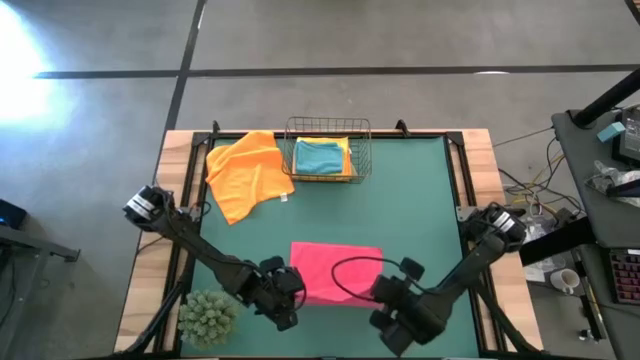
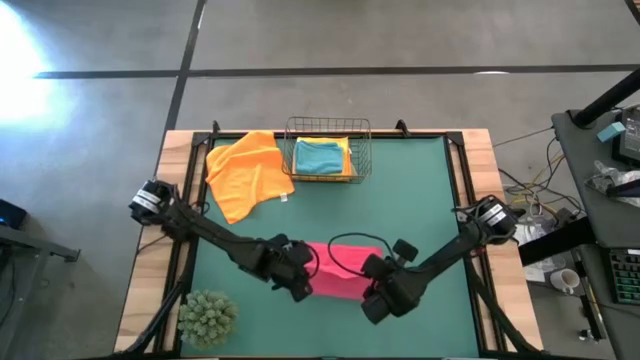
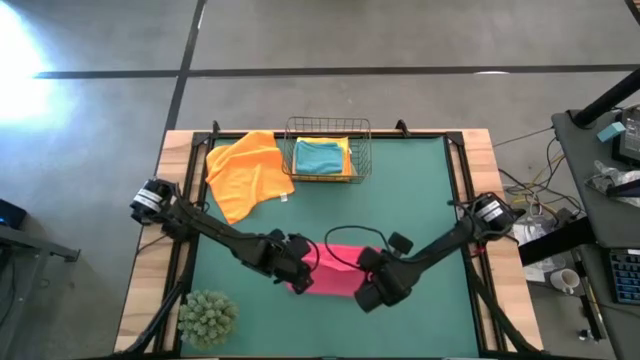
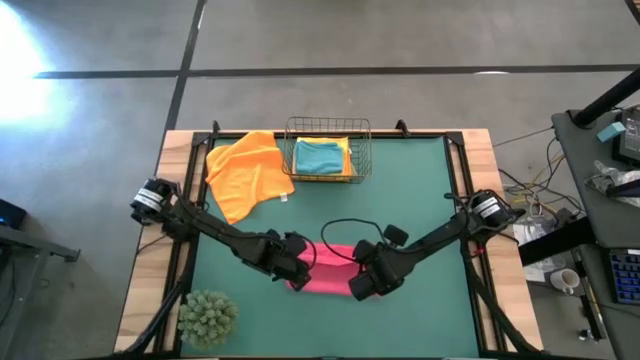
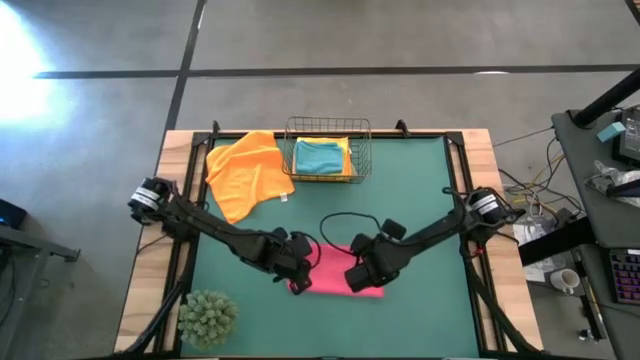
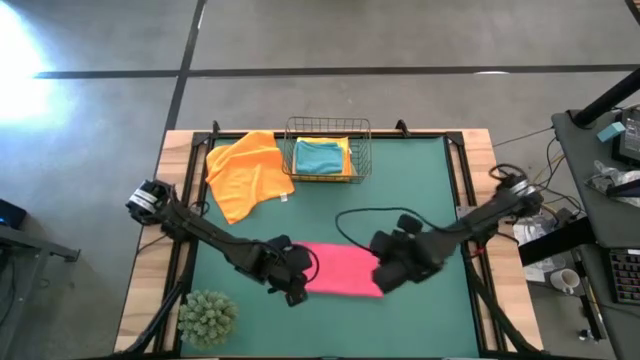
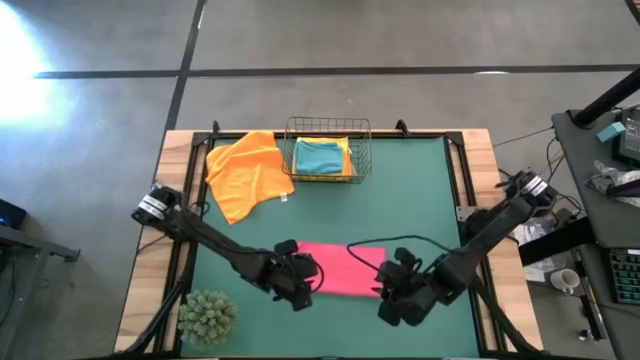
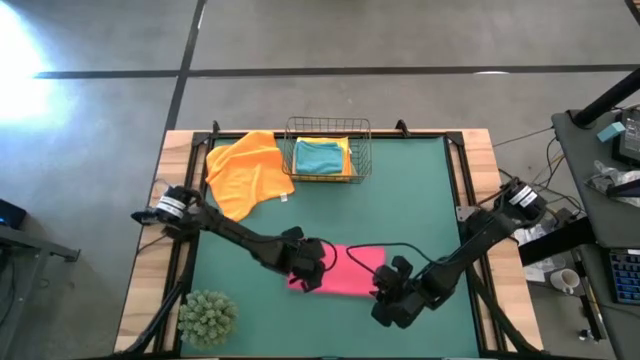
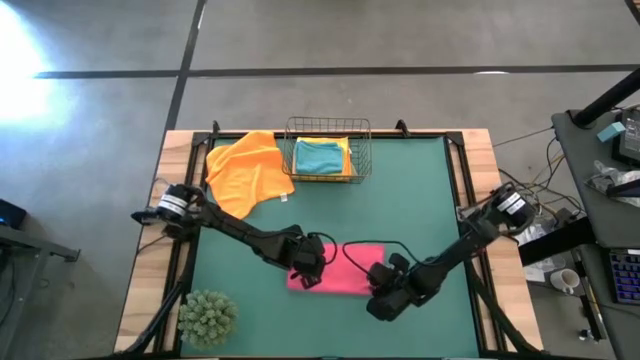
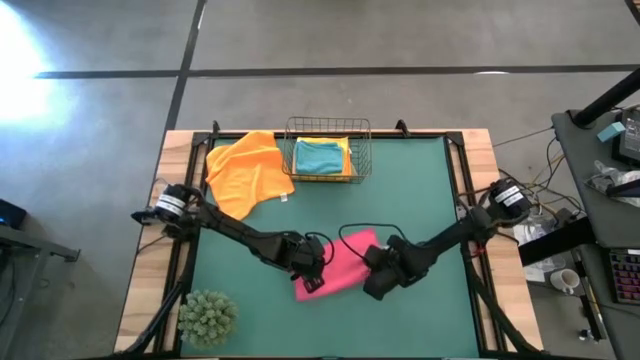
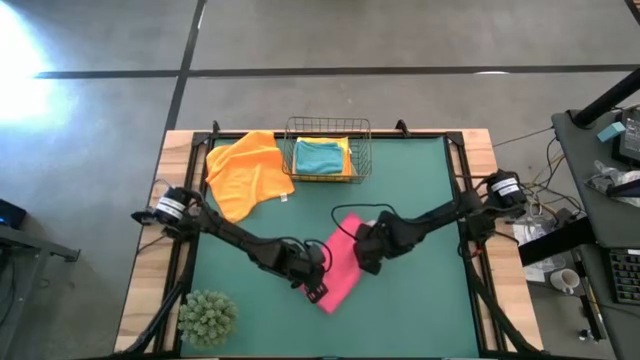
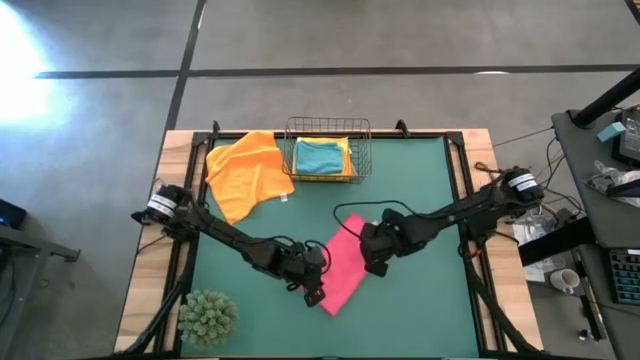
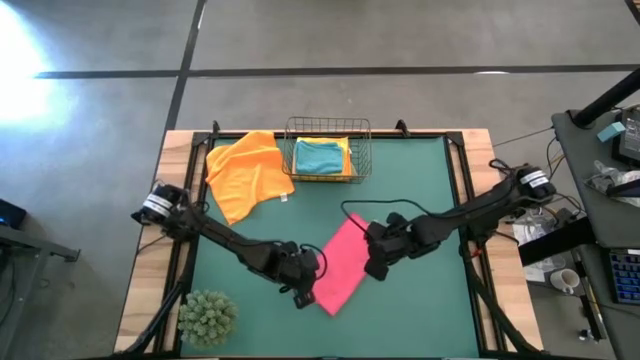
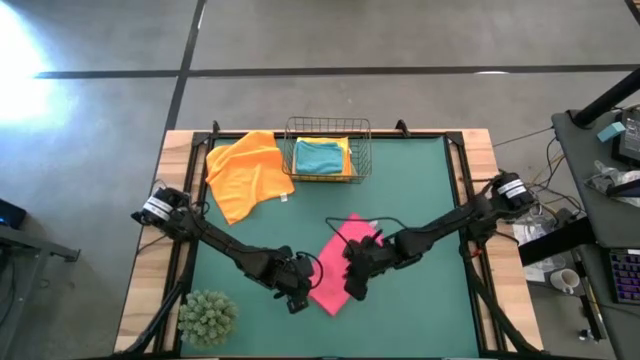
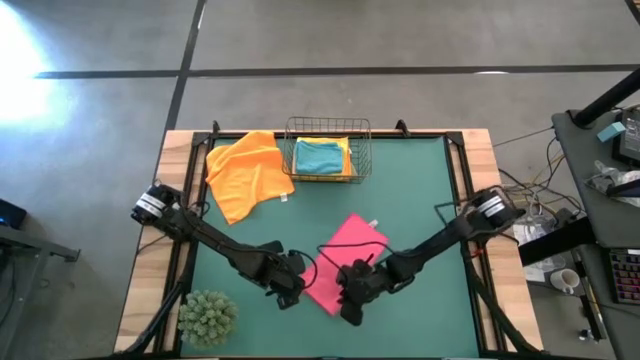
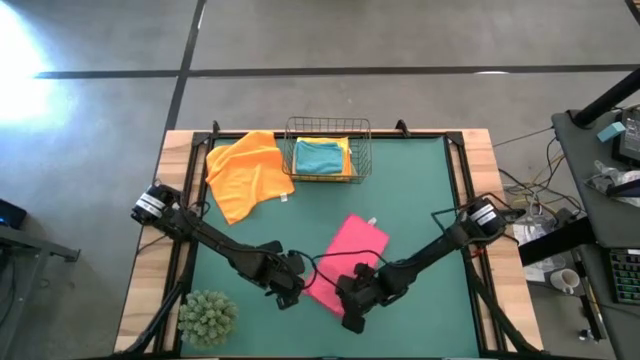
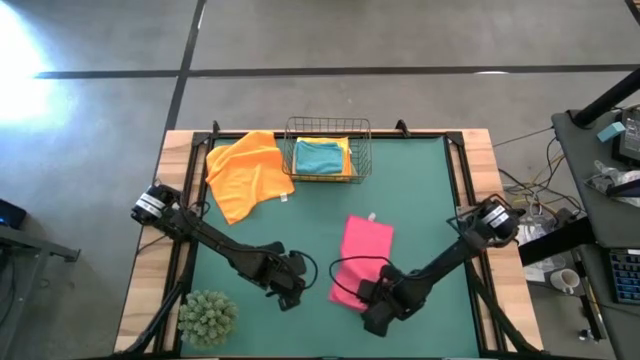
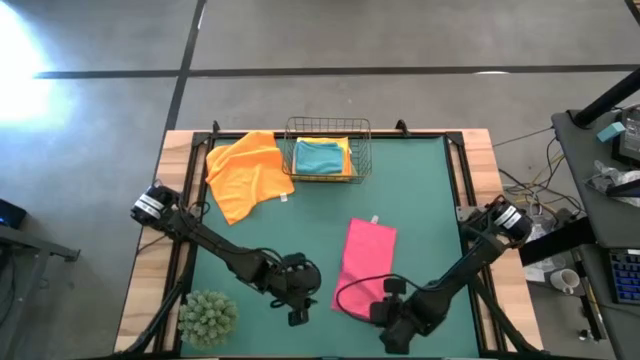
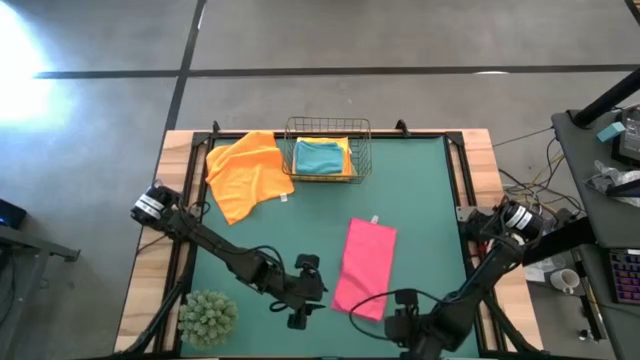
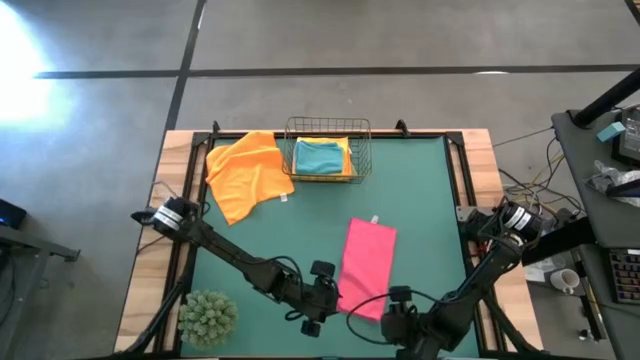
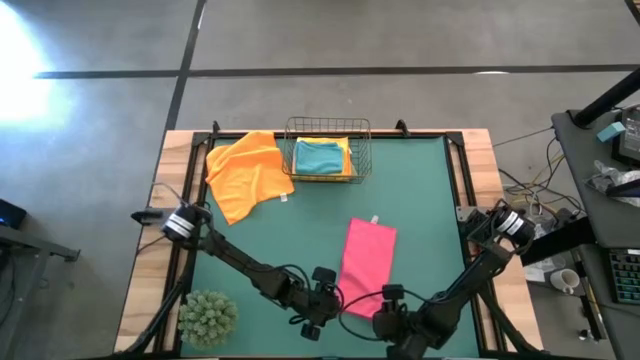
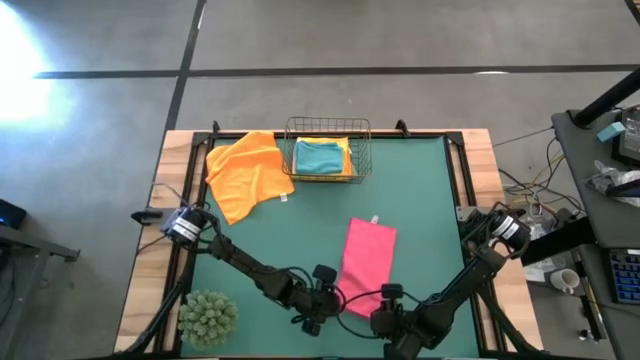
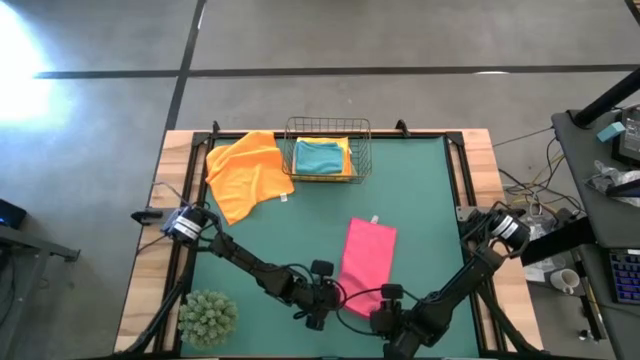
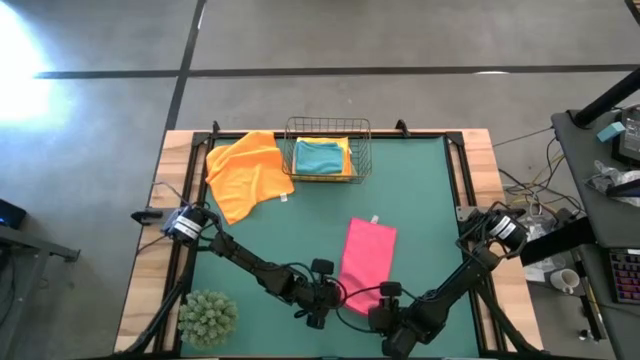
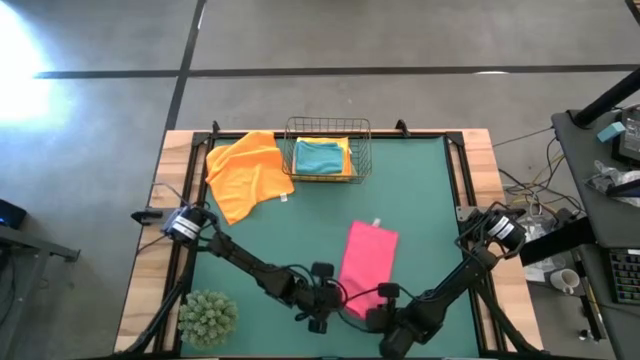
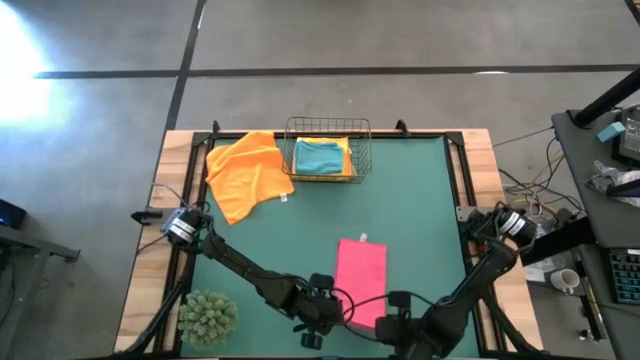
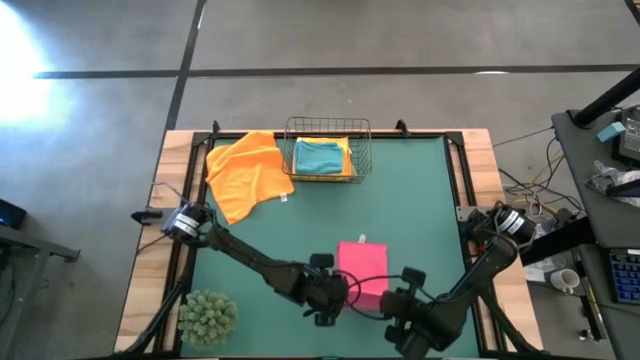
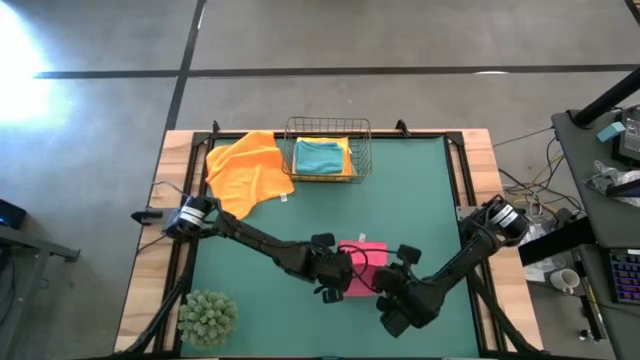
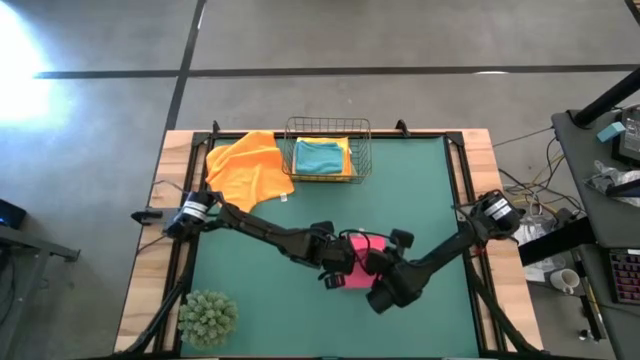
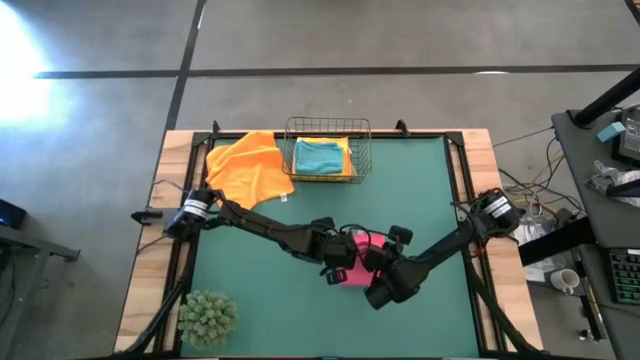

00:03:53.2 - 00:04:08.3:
Task: Fold microfiber towels
Fold the pink microfiber cloth

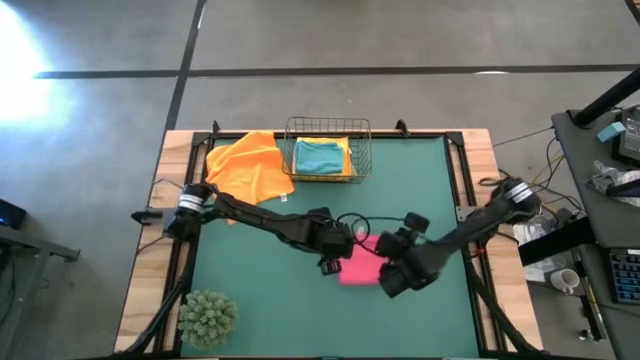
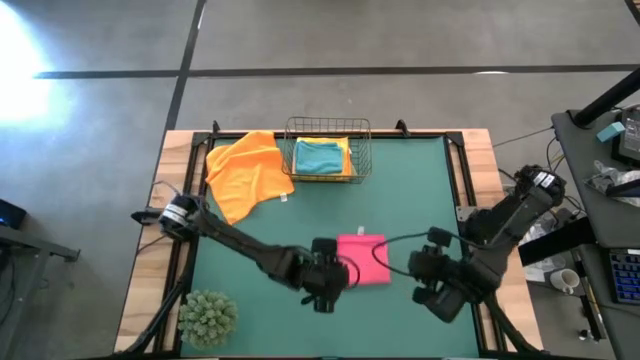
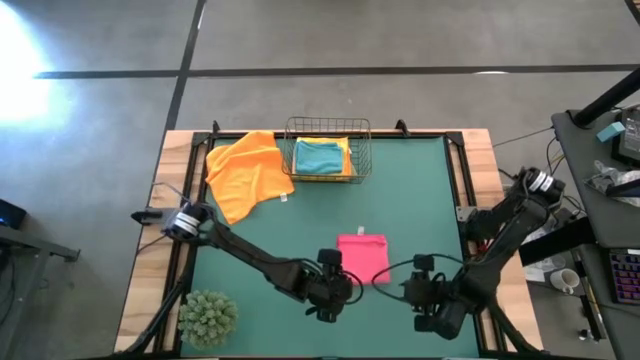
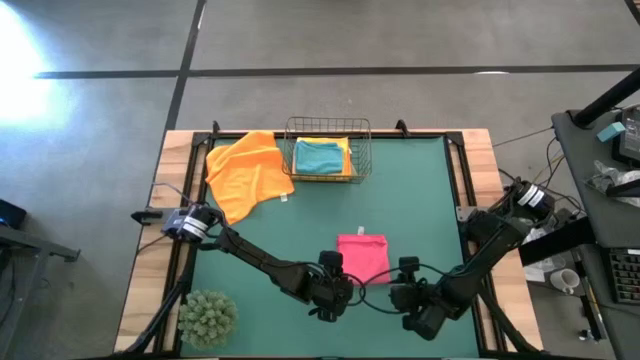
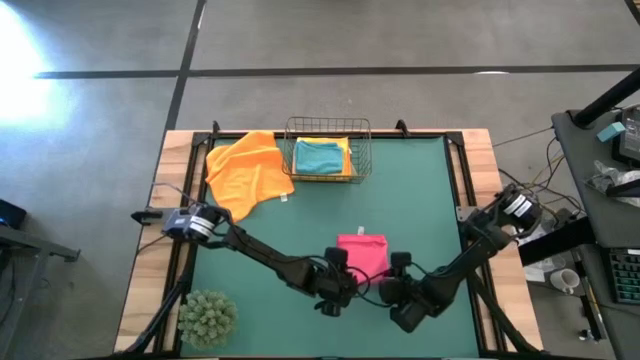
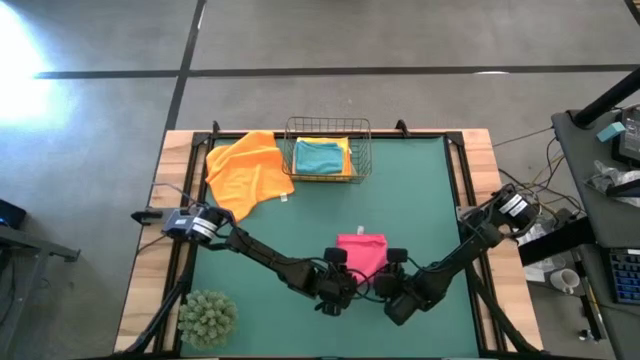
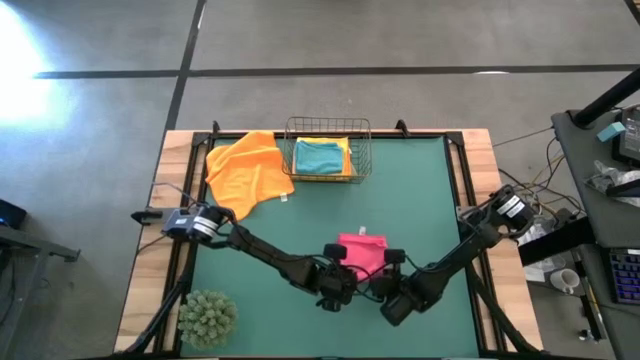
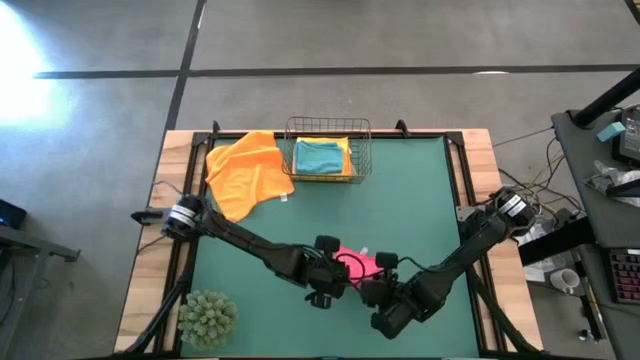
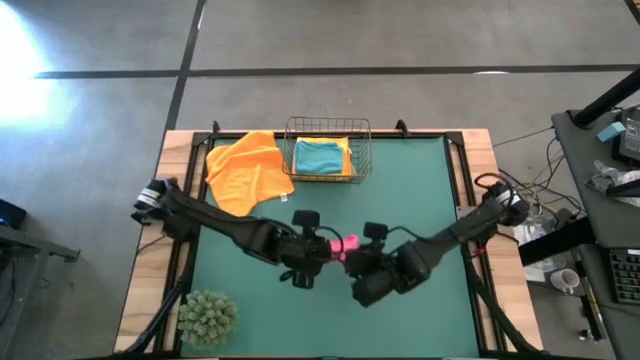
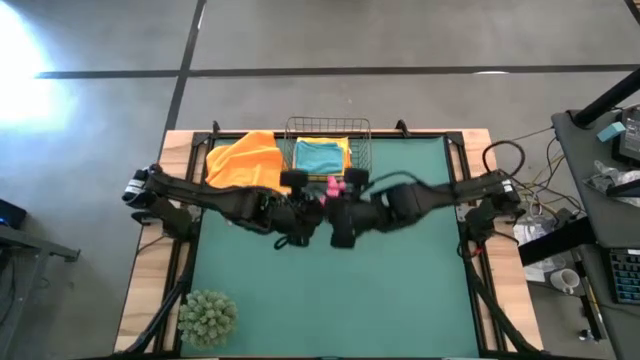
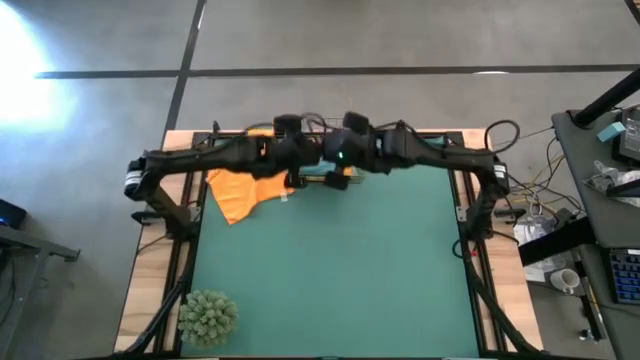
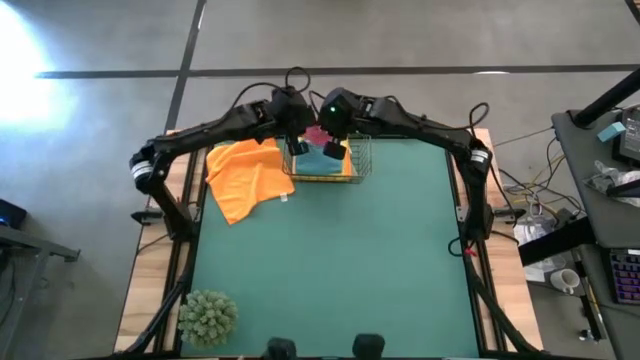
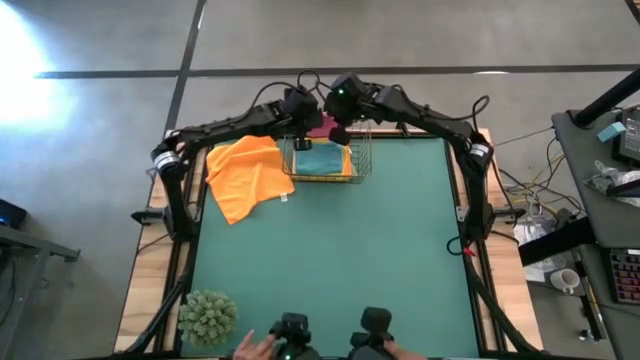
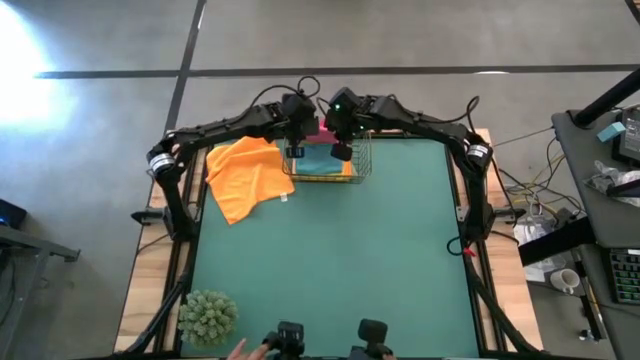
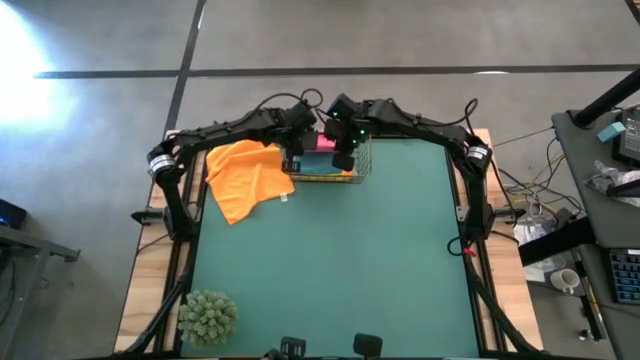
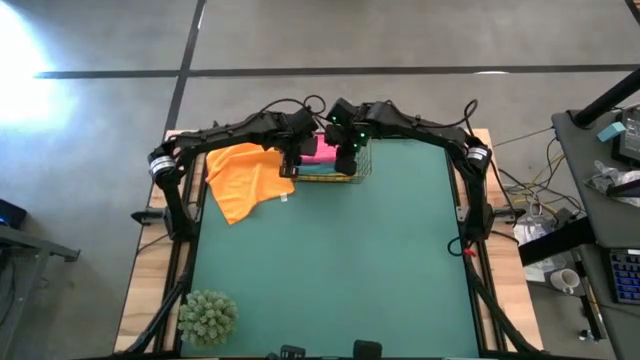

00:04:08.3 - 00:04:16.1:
Put the pink microfiber cloth into the wire basket
